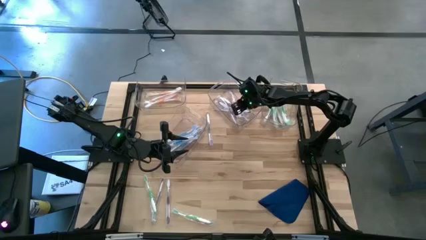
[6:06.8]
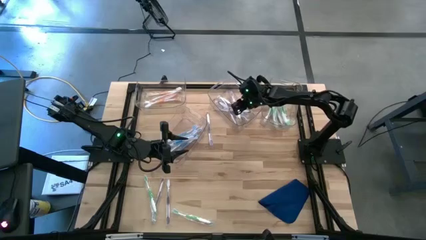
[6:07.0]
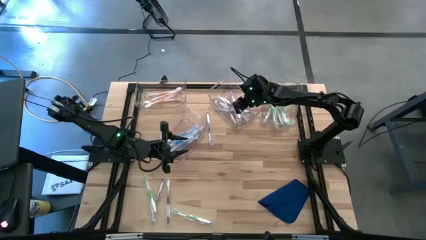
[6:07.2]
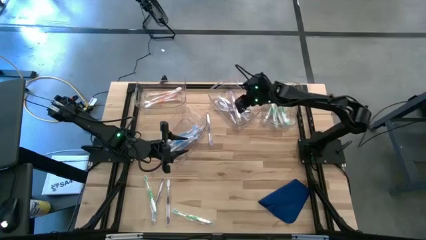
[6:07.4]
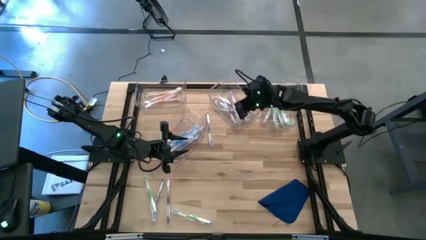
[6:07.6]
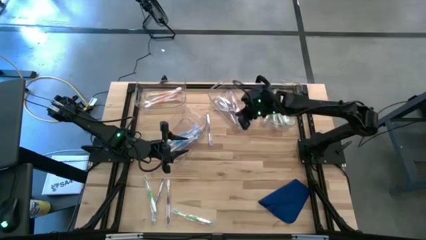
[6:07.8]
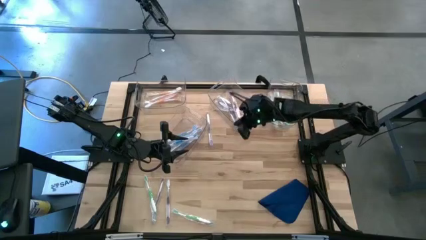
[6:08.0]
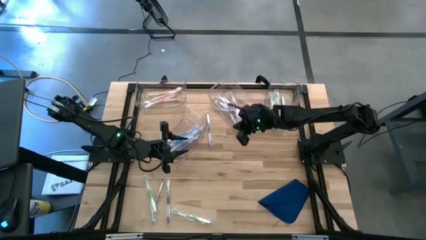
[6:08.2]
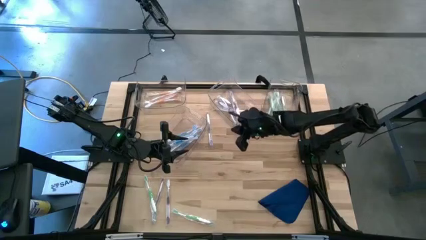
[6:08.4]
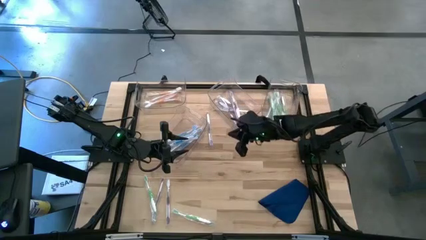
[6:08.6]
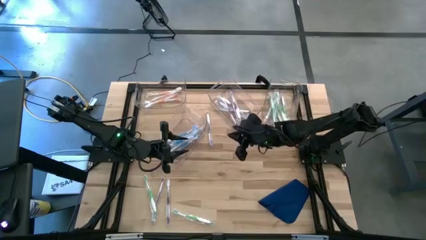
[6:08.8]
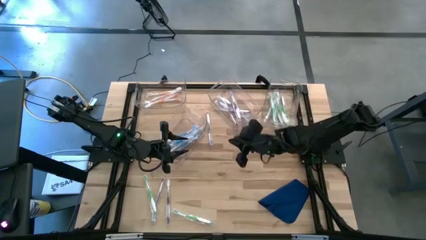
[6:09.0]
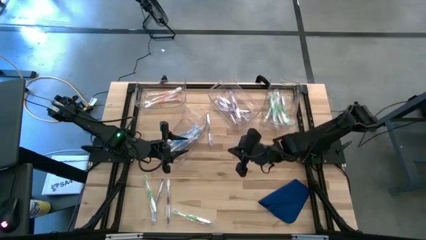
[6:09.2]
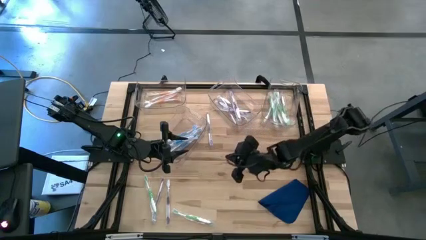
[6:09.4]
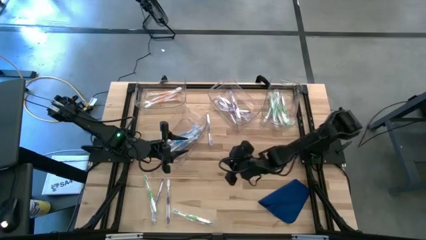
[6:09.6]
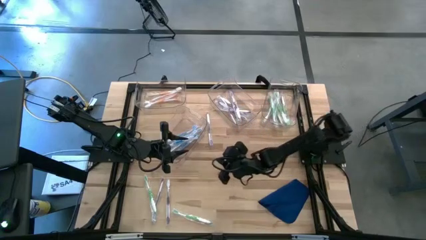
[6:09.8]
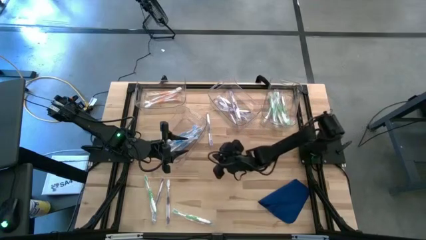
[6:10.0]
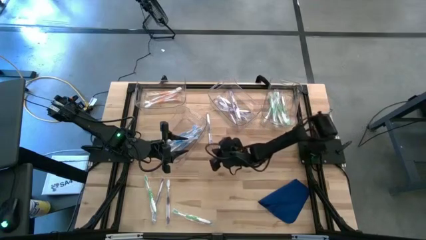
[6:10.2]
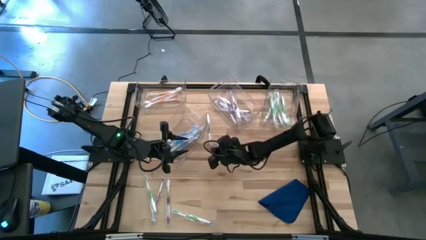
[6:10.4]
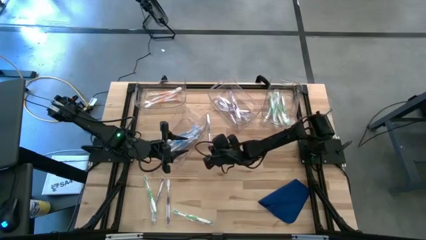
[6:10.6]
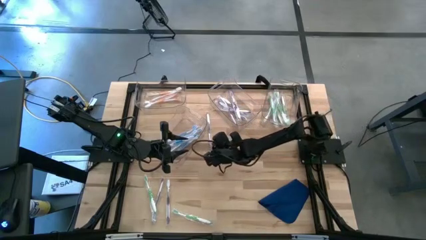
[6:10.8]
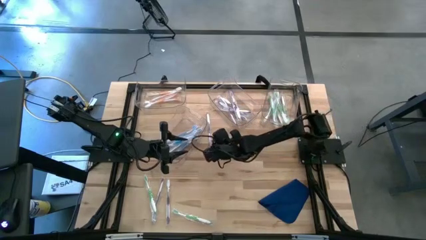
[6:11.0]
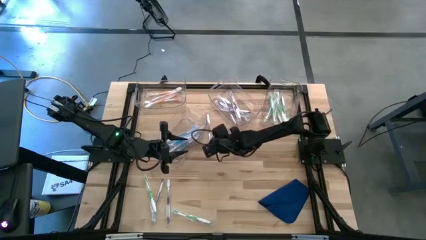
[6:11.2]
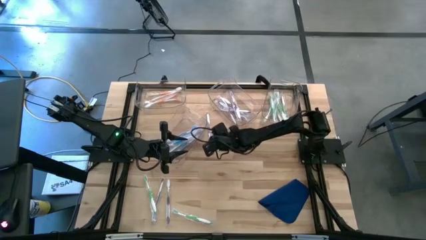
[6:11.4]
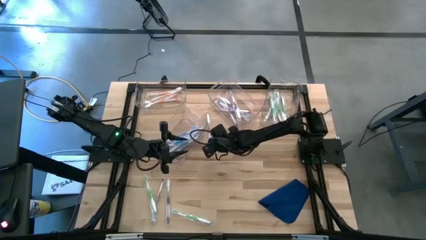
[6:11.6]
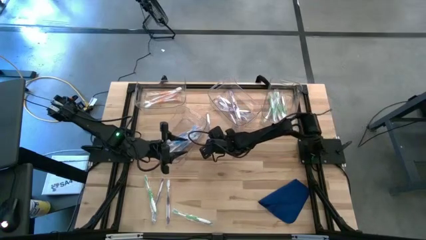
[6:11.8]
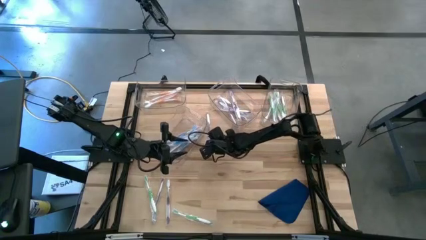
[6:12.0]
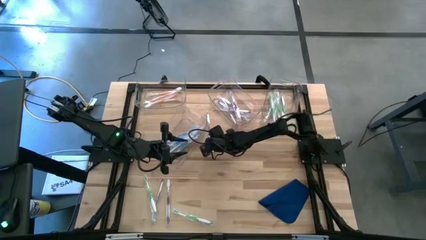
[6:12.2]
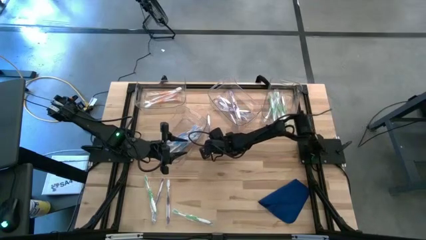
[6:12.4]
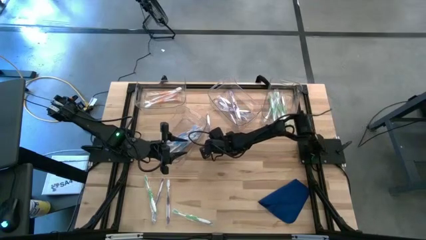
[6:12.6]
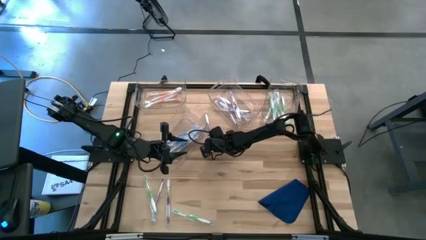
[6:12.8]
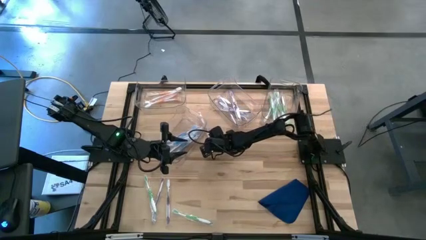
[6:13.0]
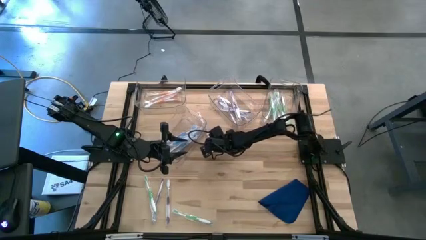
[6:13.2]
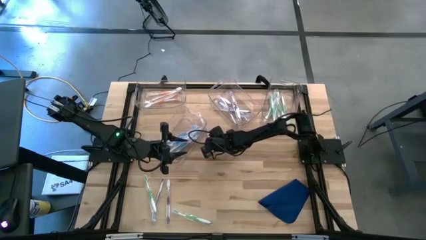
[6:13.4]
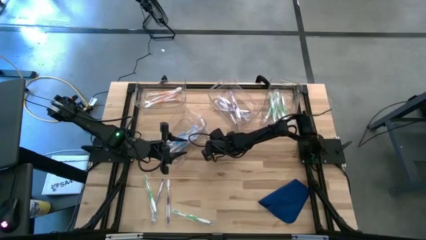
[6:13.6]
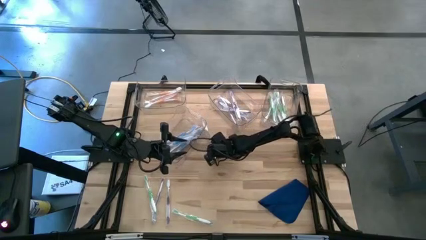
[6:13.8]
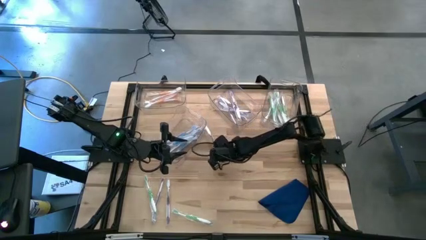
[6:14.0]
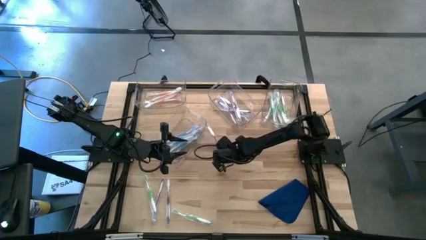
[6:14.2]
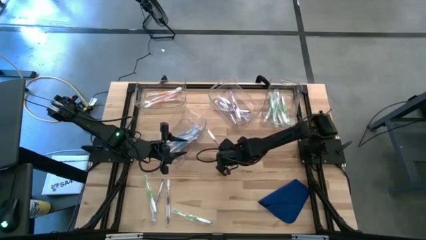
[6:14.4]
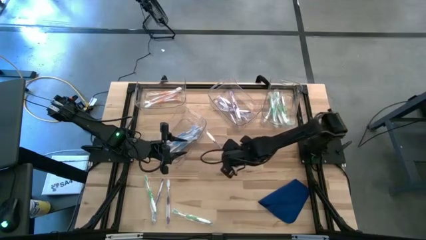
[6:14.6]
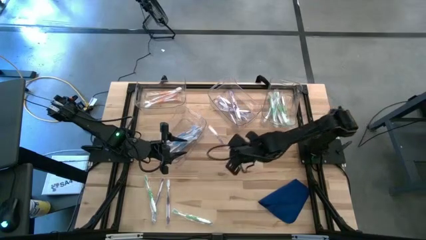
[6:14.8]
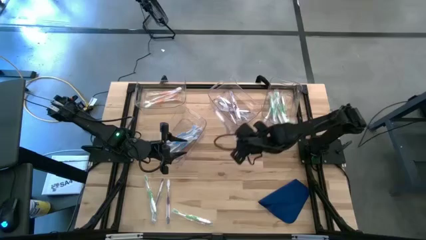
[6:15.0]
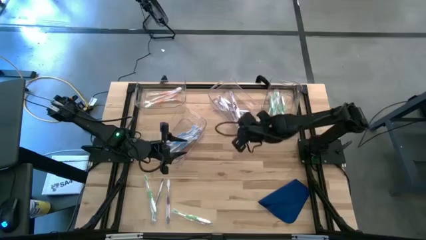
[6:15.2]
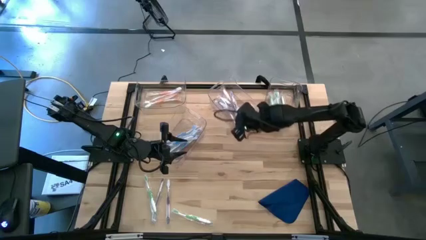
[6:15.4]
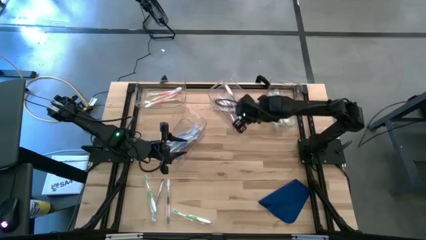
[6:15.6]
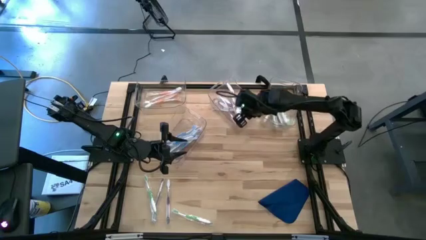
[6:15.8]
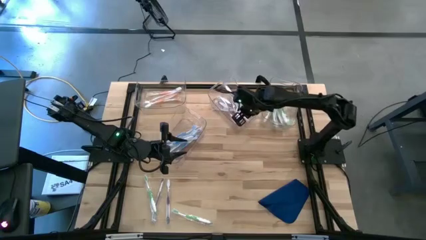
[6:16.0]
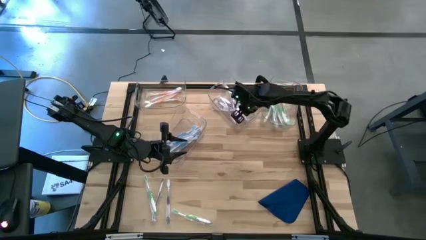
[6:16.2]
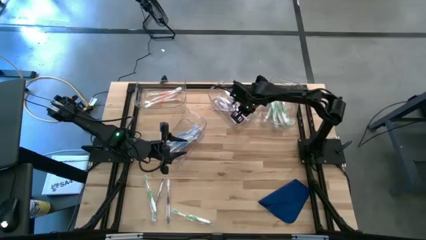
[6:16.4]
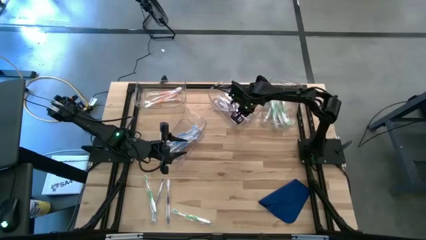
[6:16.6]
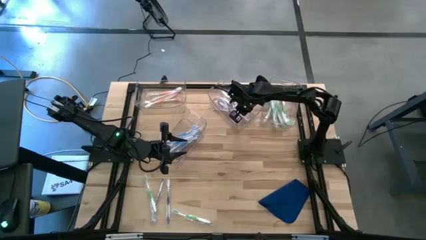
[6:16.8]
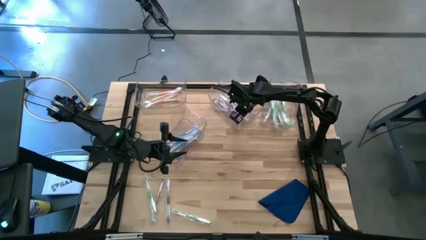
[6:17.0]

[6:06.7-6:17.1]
Task: Pick & Place Toothbrushes
Put the purple toothbrush into the top center transparent bin
